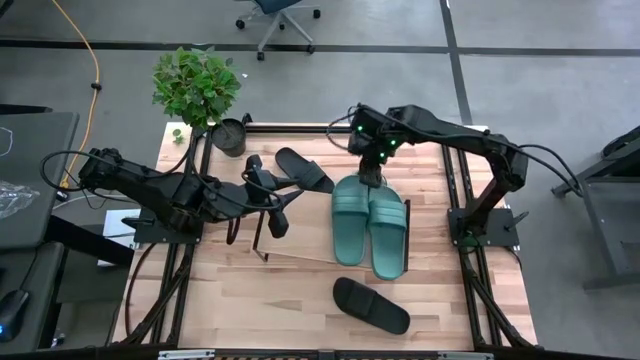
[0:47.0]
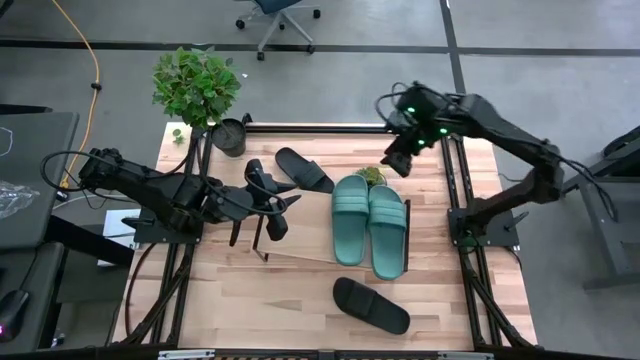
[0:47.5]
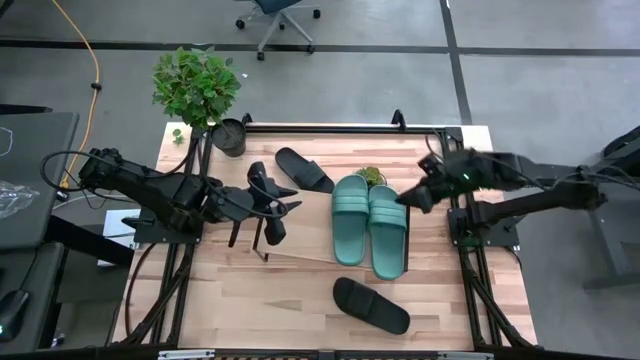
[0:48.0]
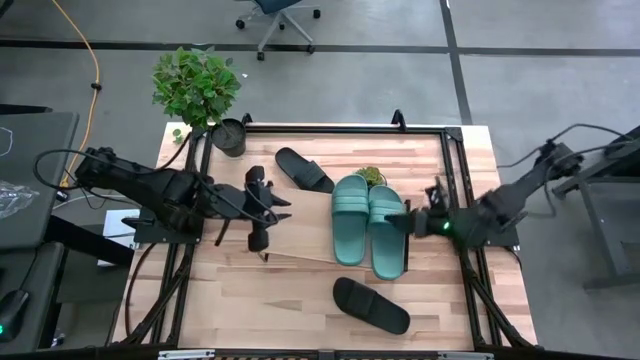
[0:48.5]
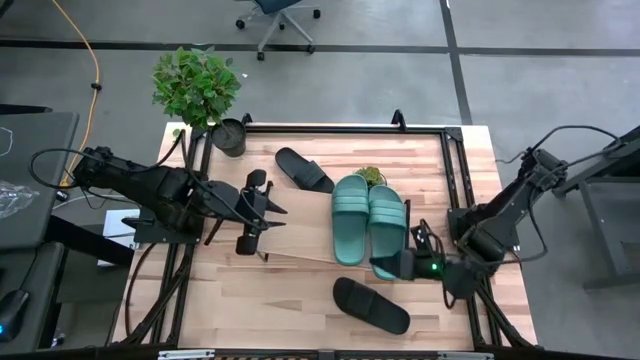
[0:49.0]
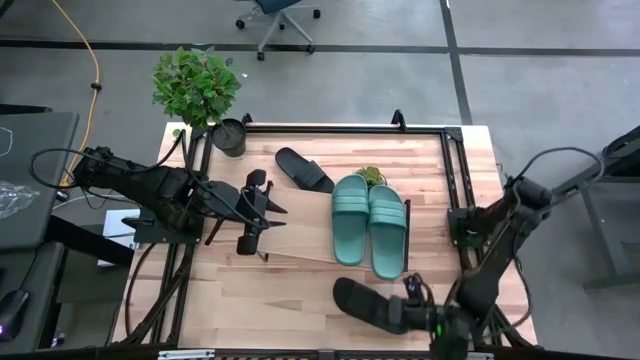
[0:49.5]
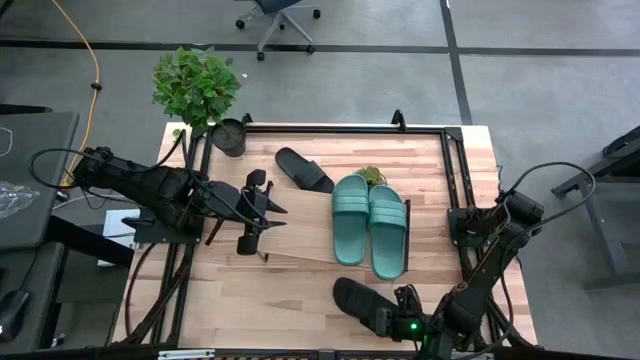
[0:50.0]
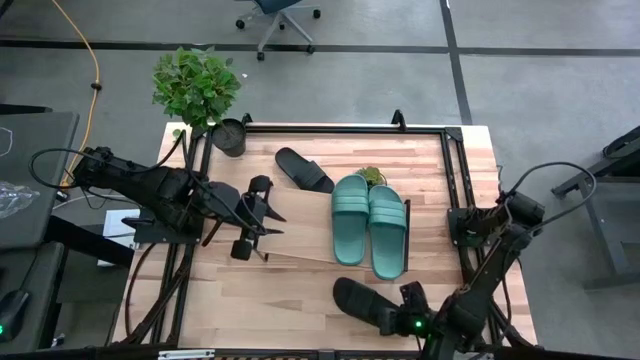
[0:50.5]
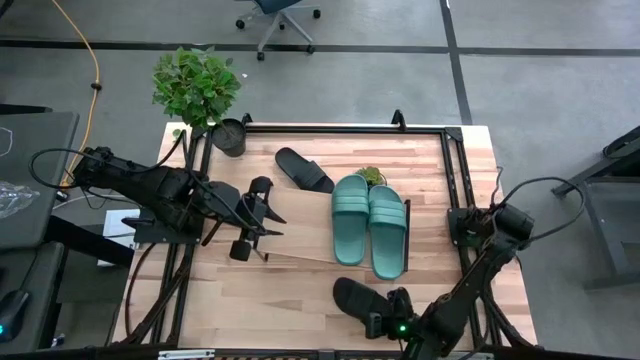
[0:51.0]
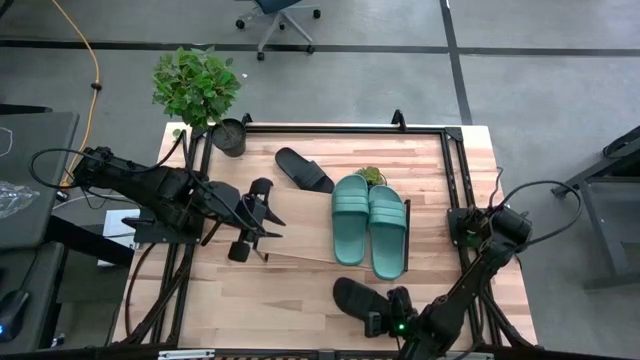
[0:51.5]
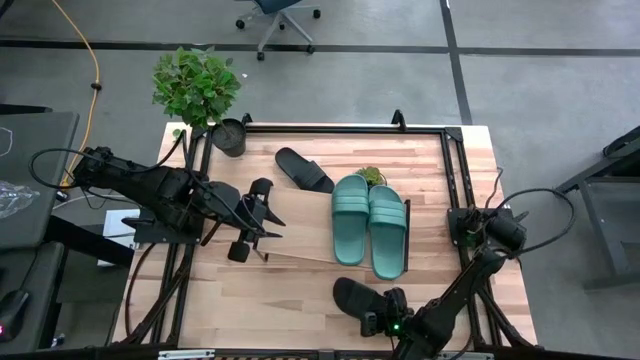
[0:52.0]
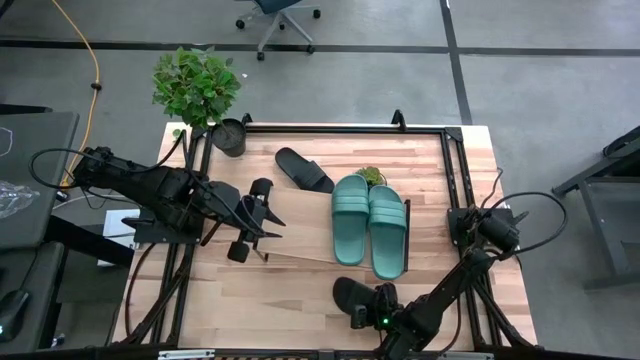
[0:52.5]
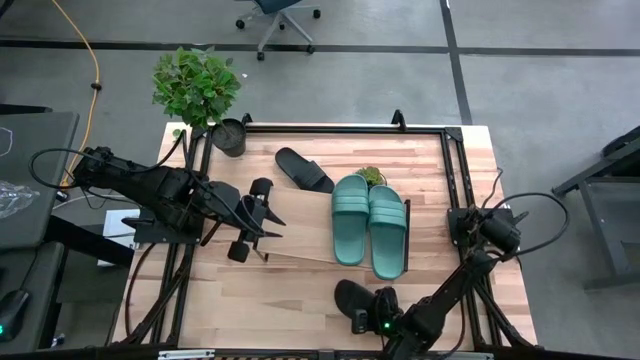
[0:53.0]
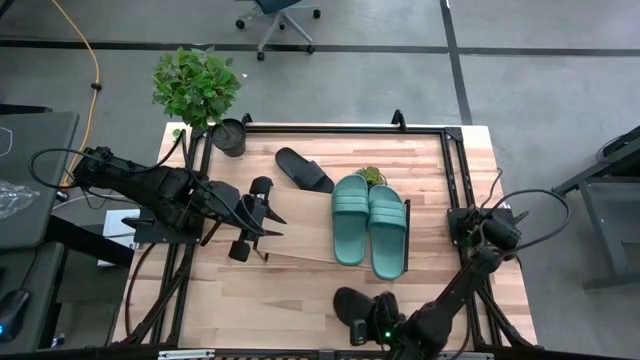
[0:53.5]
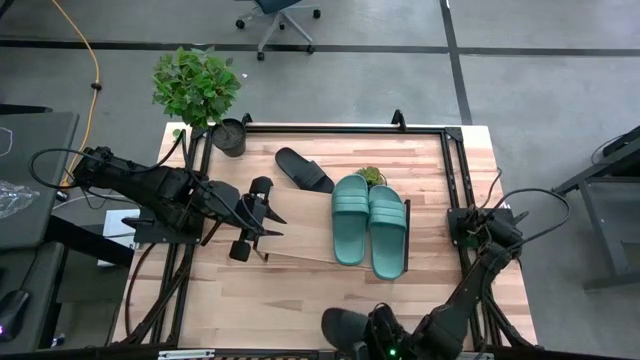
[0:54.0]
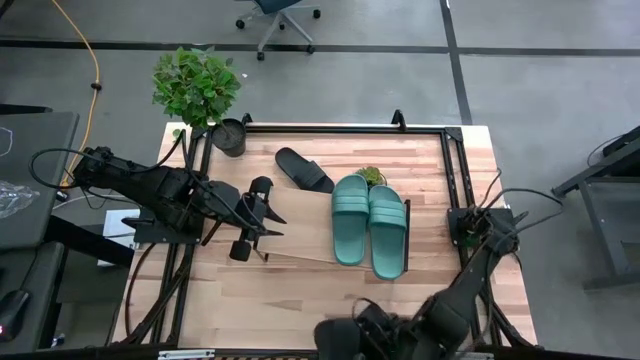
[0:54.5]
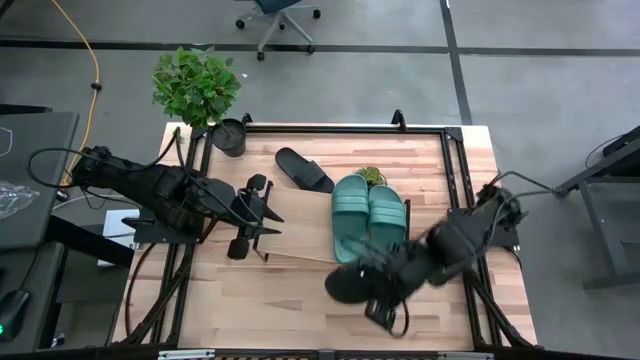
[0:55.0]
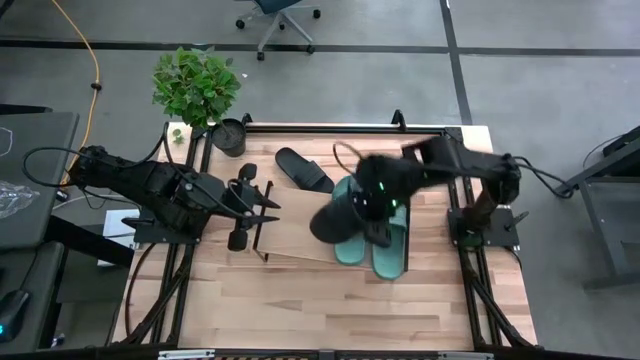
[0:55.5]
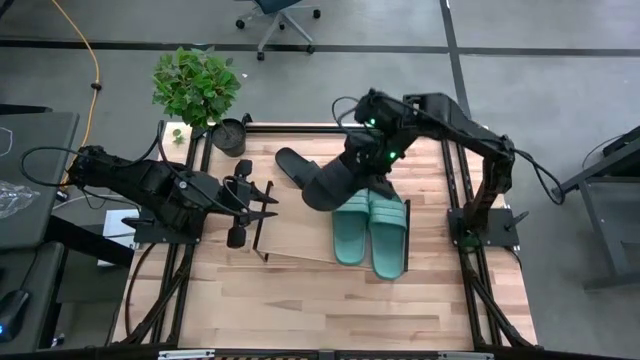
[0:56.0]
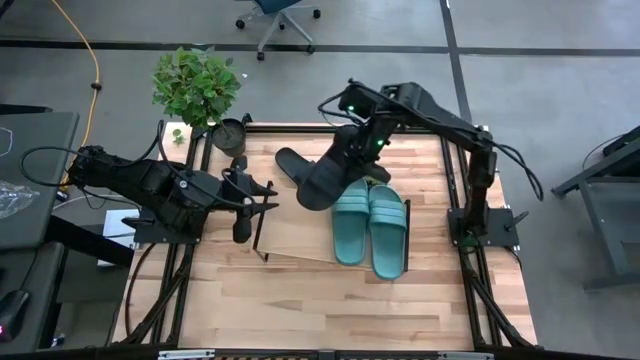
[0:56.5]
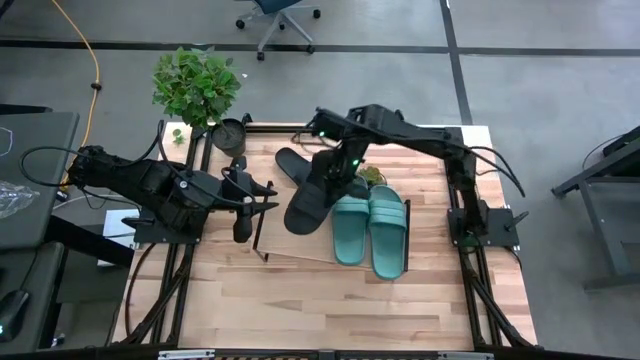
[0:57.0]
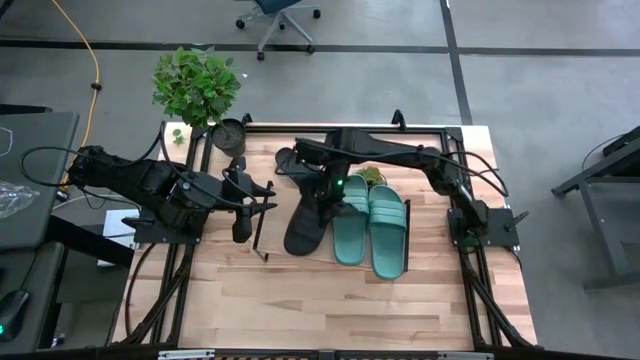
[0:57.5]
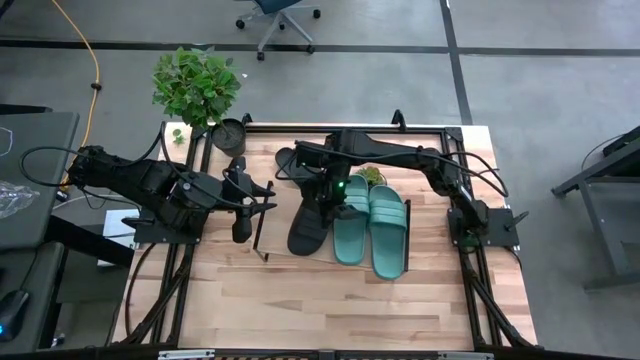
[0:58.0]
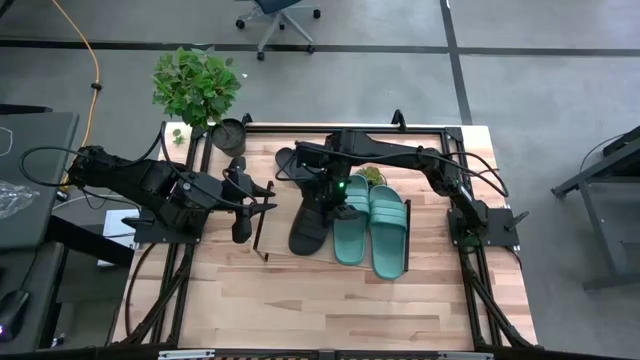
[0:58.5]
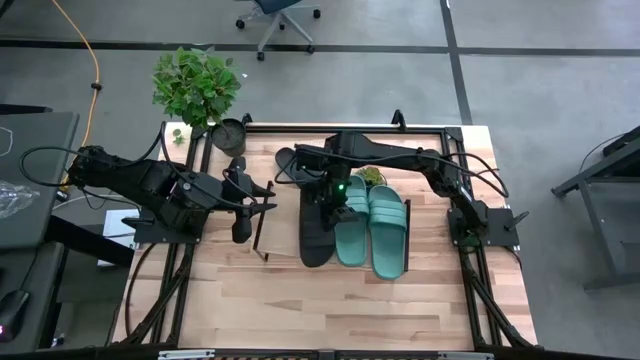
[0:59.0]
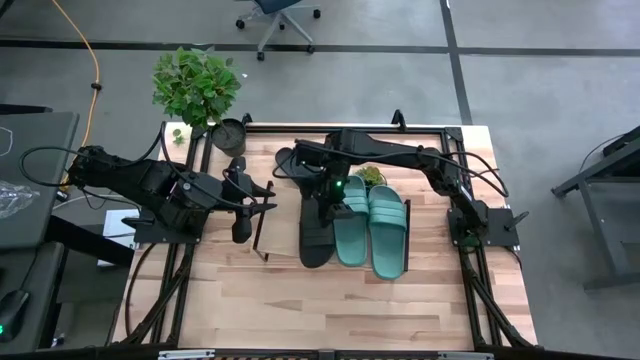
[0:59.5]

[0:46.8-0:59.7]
Task: Pick and place slides into the shelf
Put the bottom black slipper on the shelf

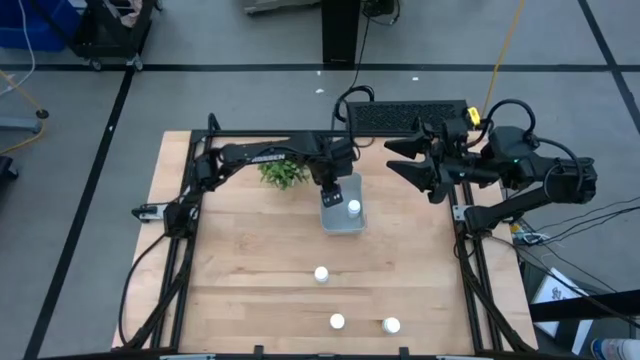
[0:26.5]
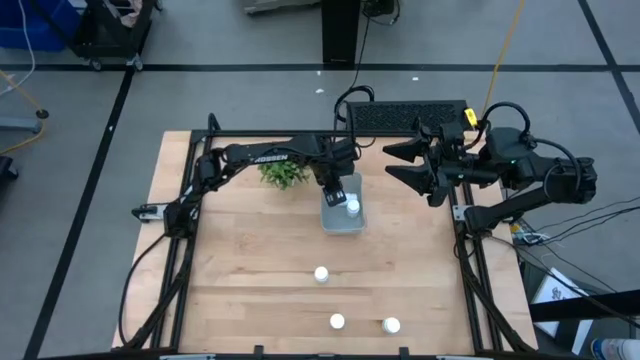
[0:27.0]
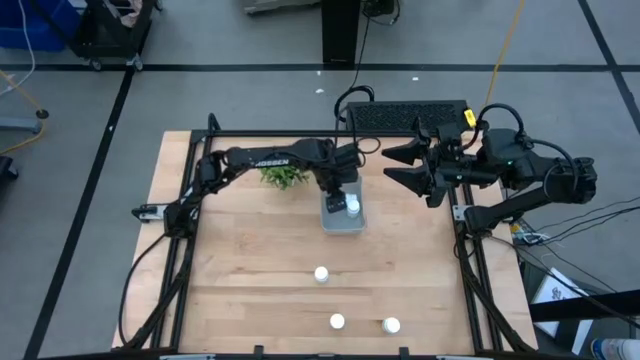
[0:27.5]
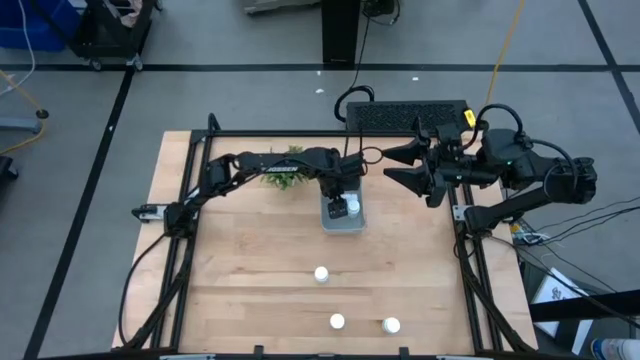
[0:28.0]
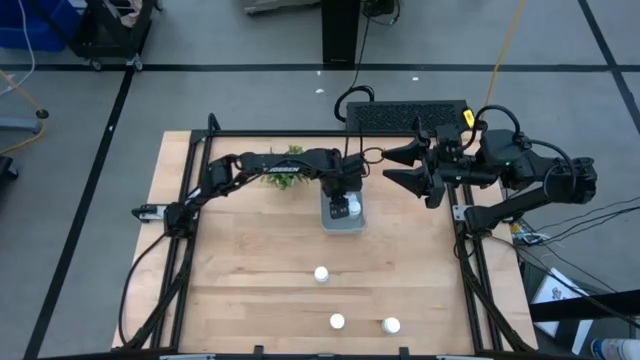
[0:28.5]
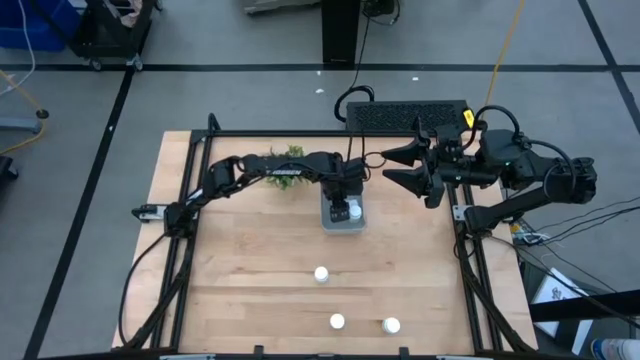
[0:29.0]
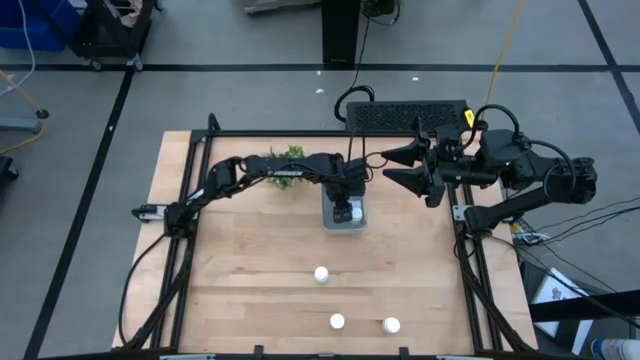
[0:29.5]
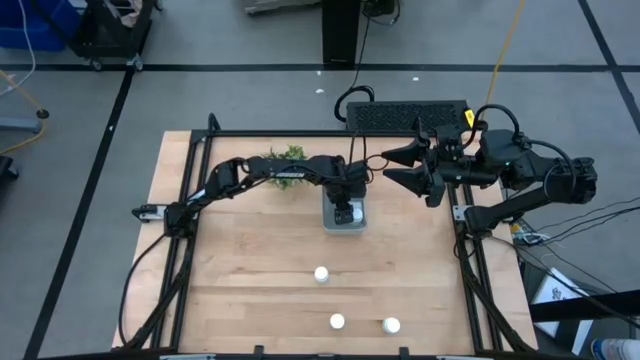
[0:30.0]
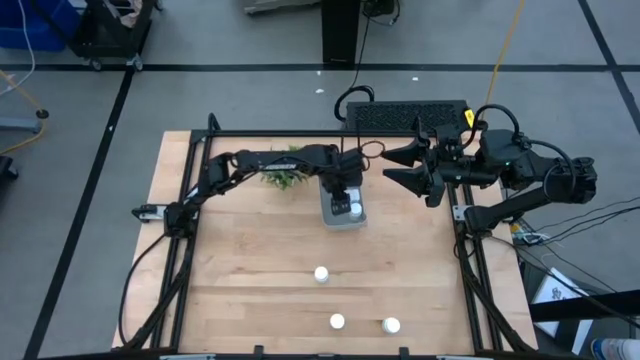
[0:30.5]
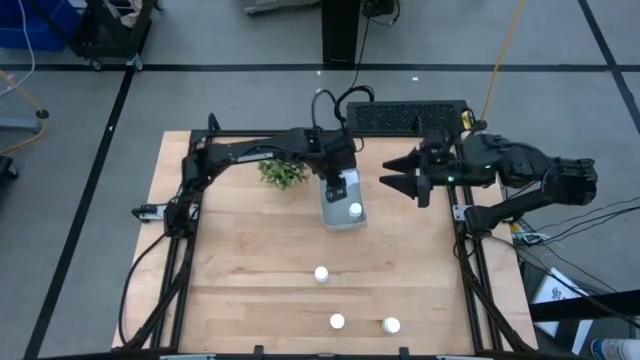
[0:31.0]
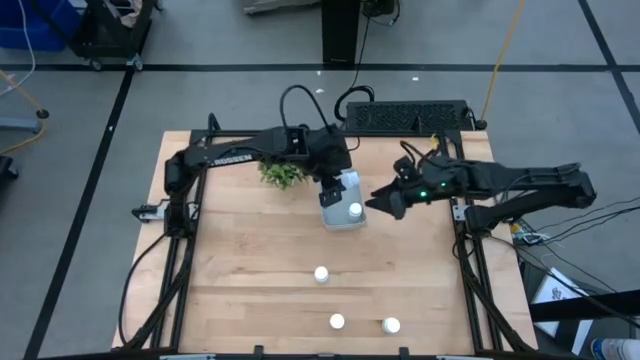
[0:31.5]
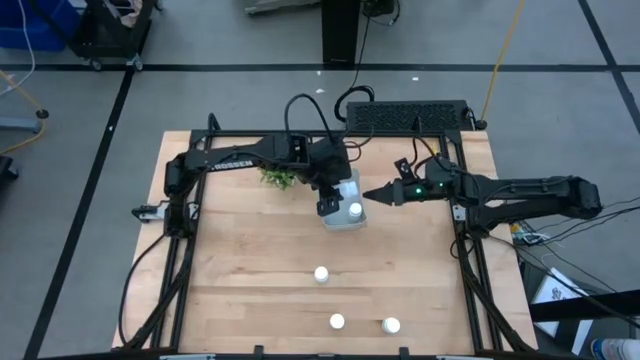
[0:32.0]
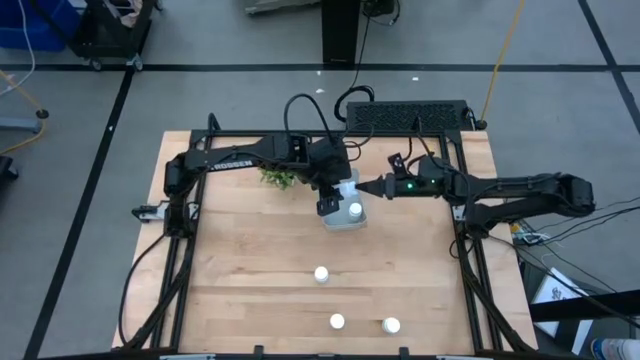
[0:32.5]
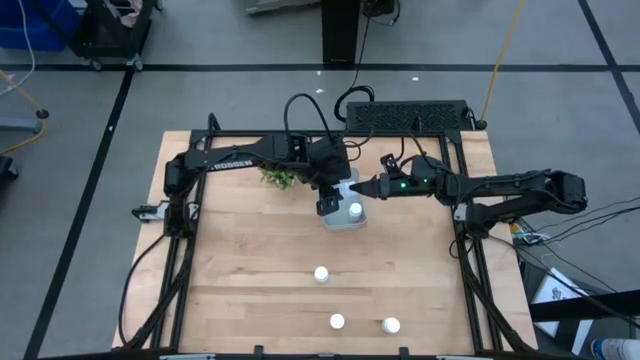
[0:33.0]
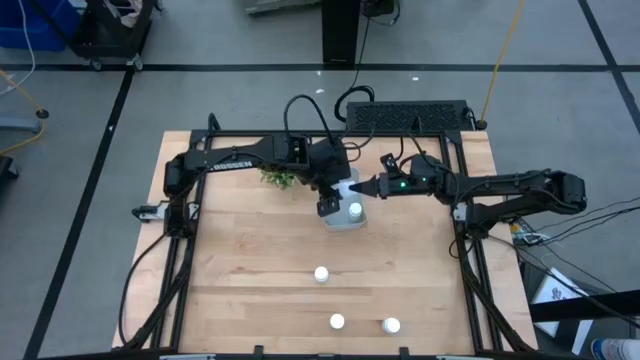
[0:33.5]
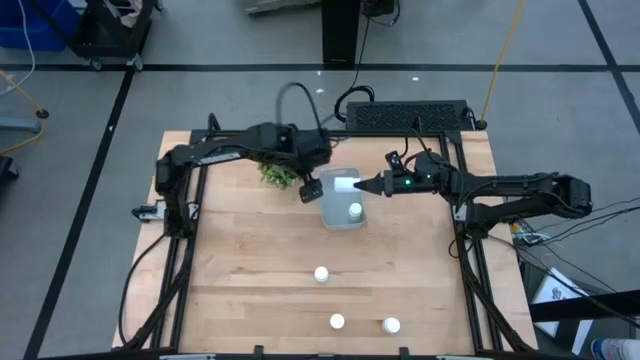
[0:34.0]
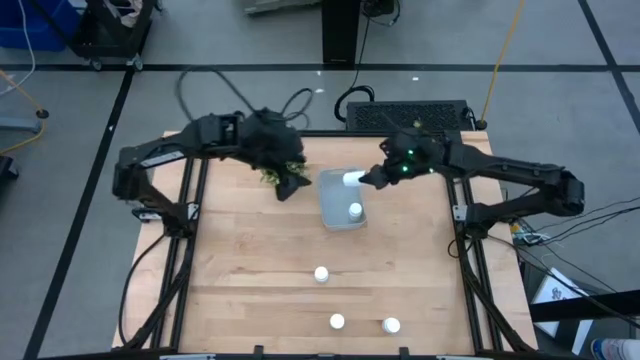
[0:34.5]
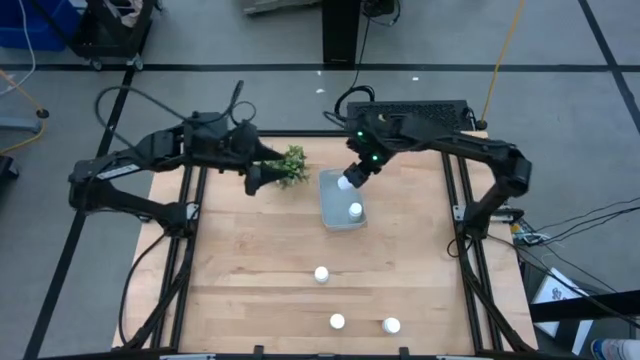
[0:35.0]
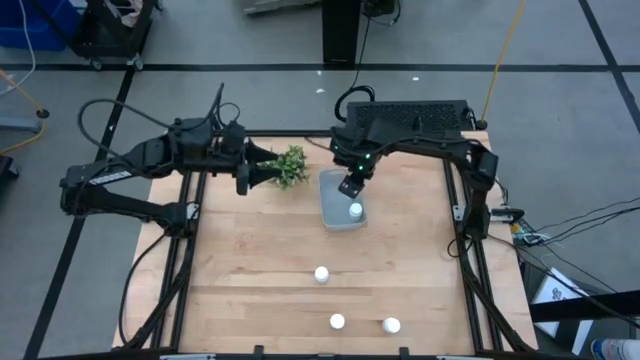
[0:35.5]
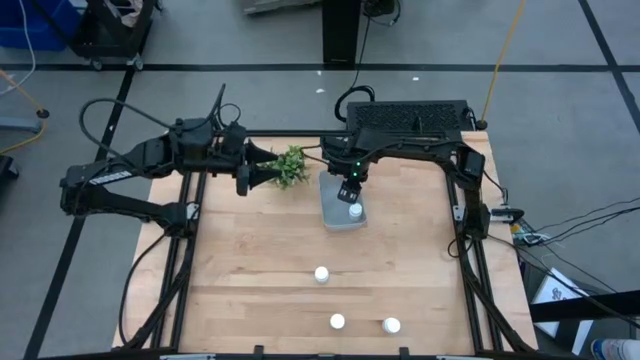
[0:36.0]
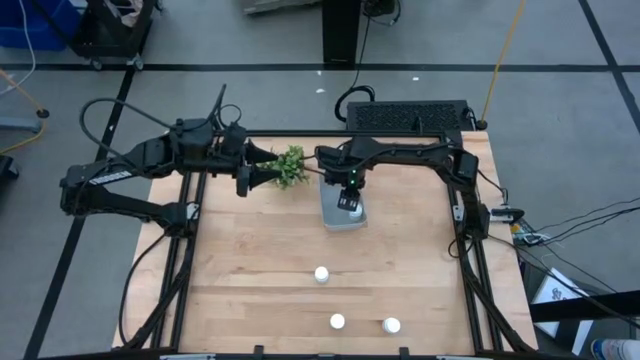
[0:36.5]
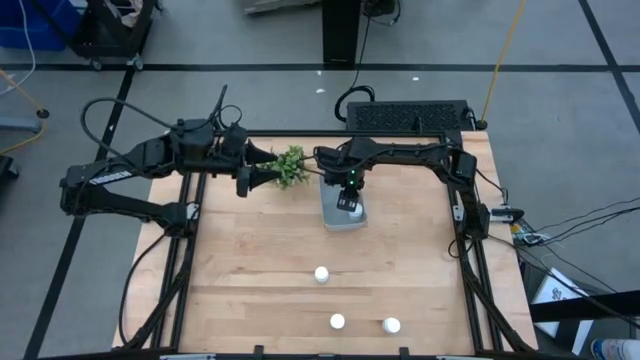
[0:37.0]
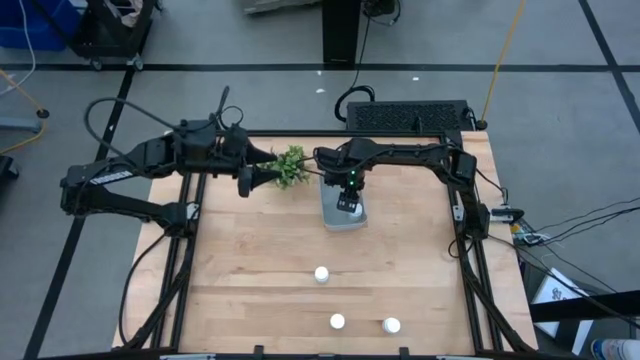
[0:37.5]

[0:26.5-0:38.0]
Task: Pick and place pill bottles into a basket
Put the white pill bottle into the gray bin
